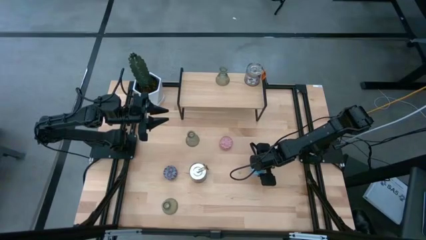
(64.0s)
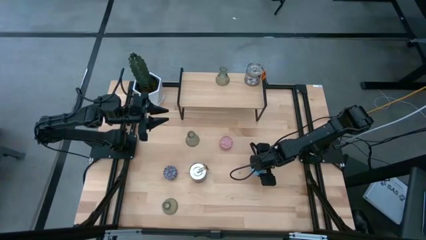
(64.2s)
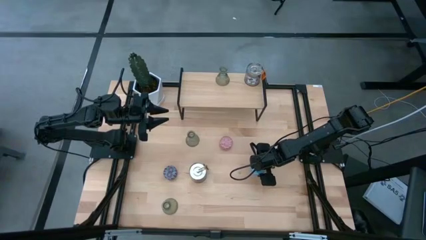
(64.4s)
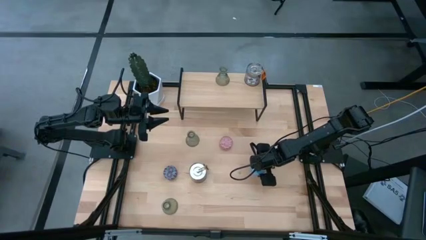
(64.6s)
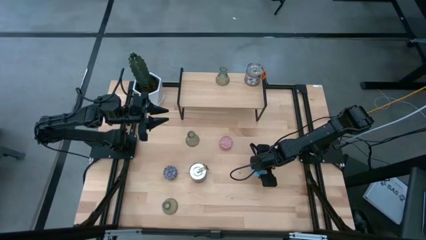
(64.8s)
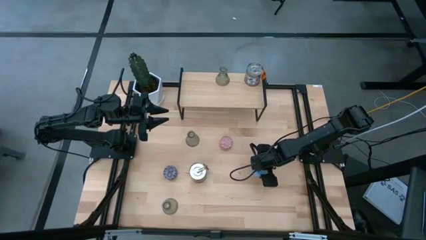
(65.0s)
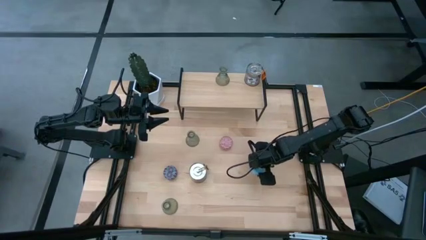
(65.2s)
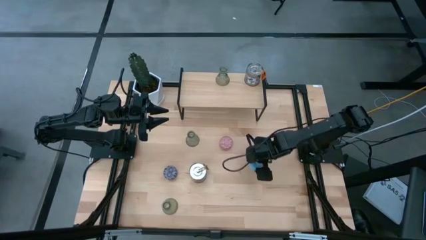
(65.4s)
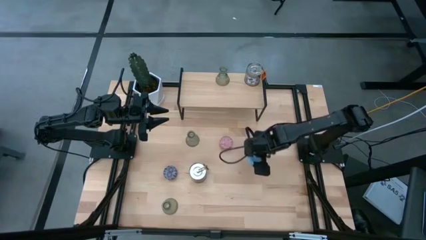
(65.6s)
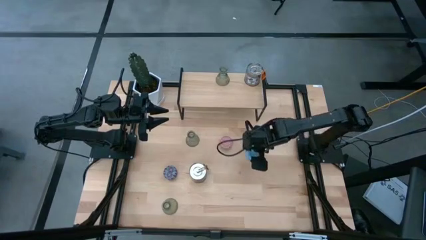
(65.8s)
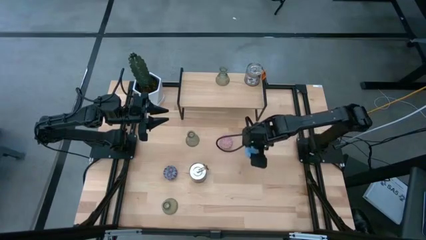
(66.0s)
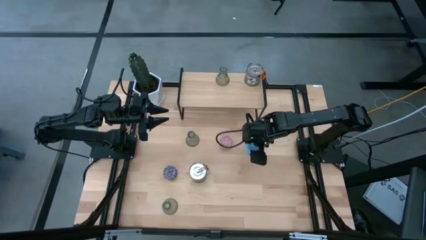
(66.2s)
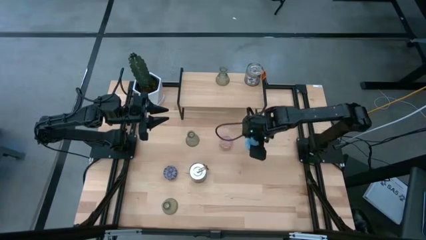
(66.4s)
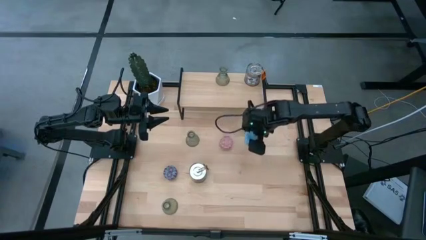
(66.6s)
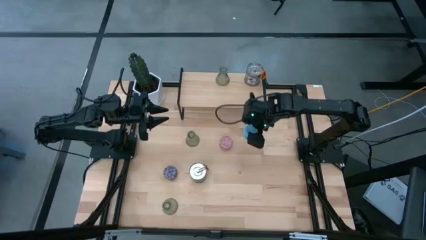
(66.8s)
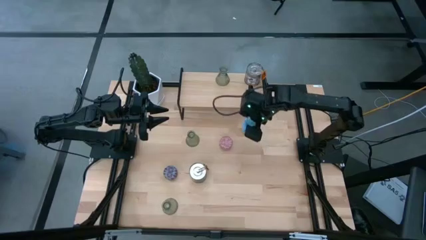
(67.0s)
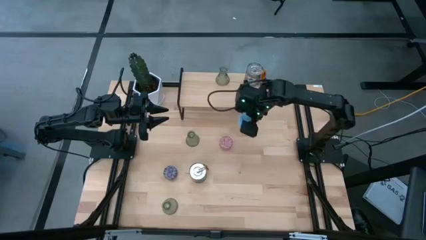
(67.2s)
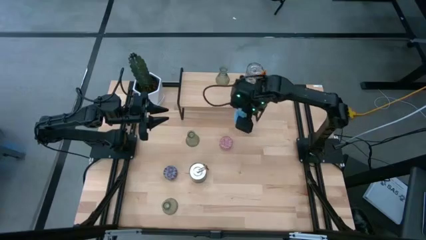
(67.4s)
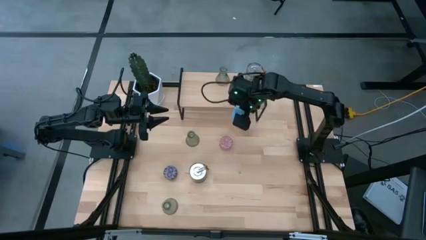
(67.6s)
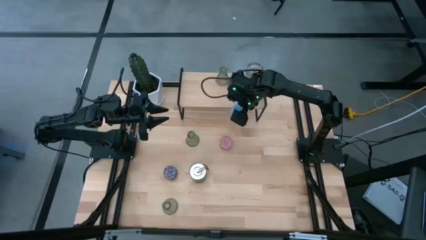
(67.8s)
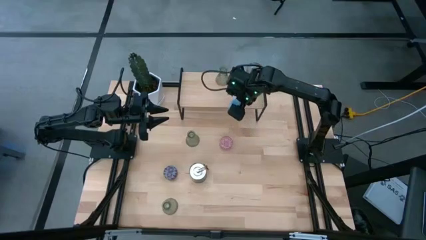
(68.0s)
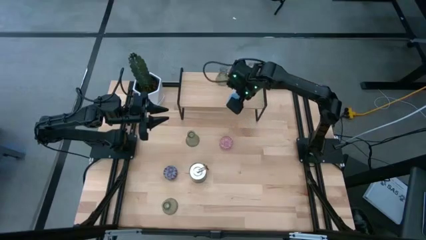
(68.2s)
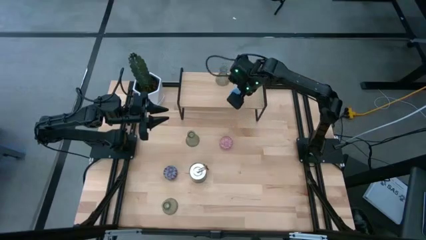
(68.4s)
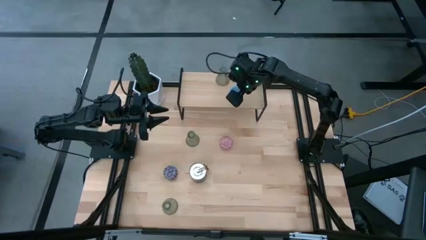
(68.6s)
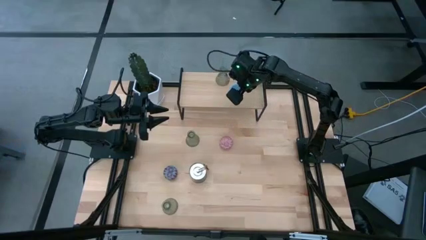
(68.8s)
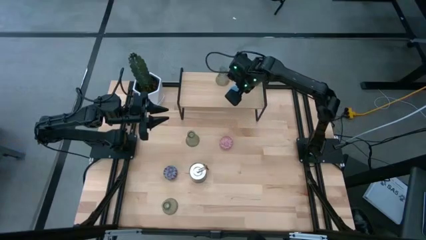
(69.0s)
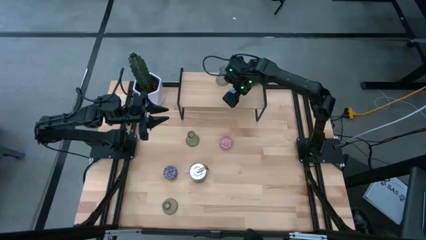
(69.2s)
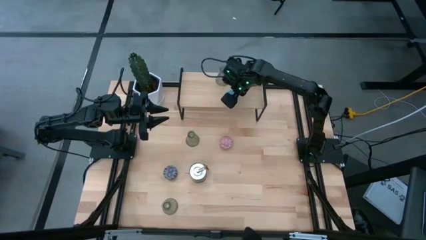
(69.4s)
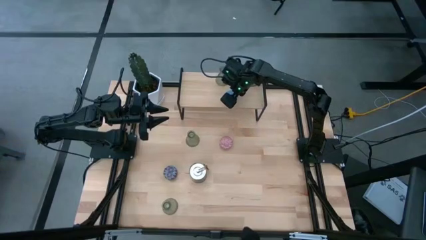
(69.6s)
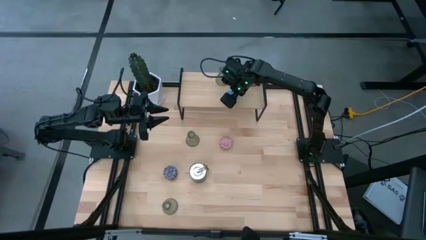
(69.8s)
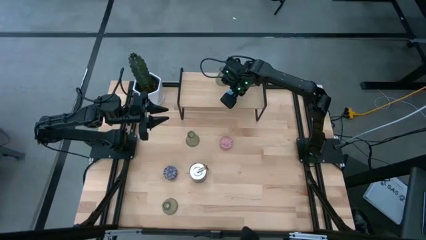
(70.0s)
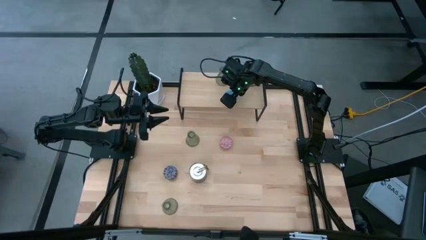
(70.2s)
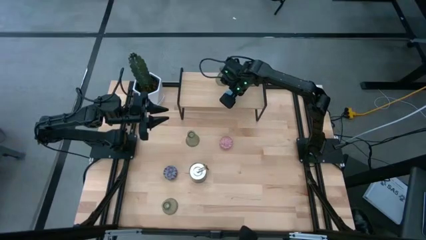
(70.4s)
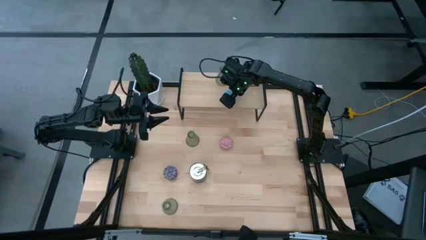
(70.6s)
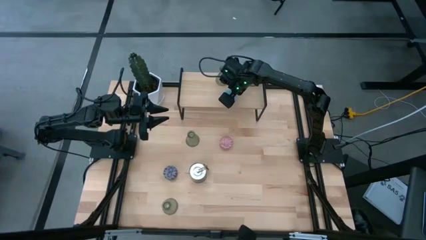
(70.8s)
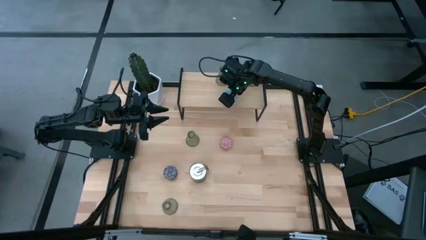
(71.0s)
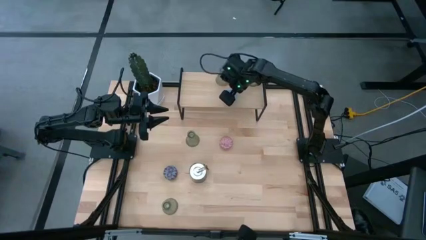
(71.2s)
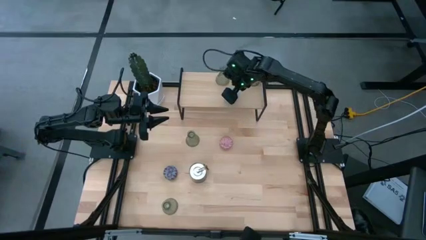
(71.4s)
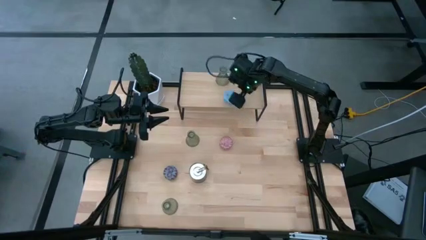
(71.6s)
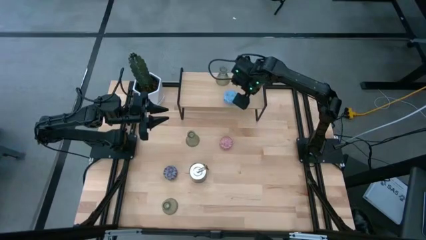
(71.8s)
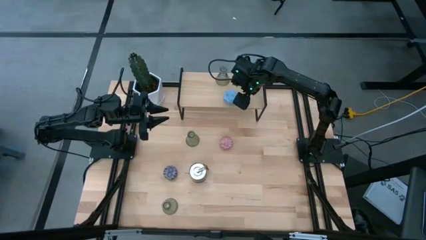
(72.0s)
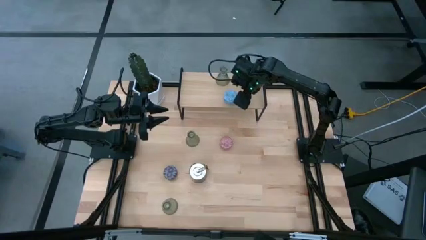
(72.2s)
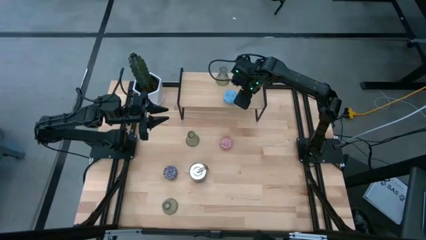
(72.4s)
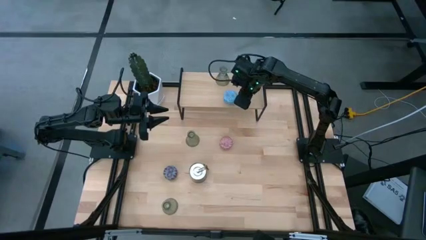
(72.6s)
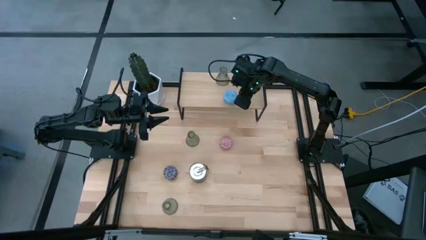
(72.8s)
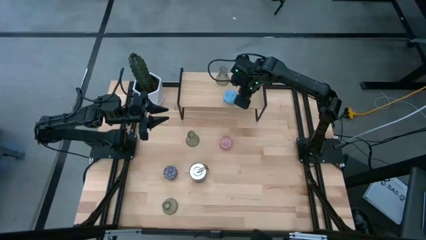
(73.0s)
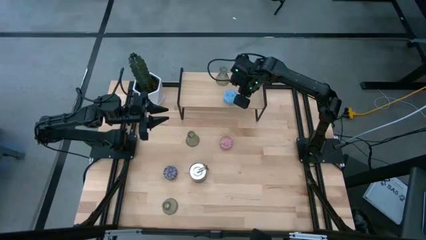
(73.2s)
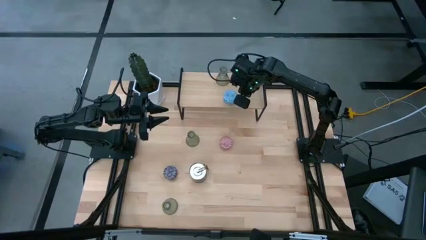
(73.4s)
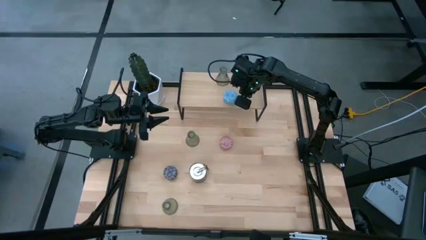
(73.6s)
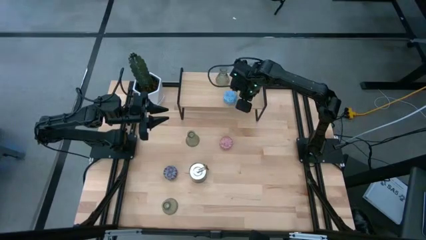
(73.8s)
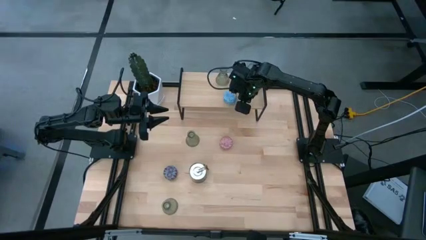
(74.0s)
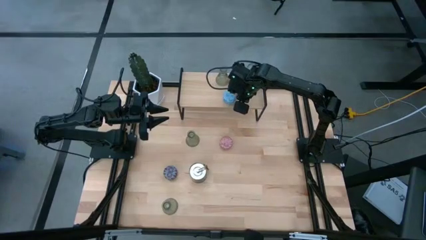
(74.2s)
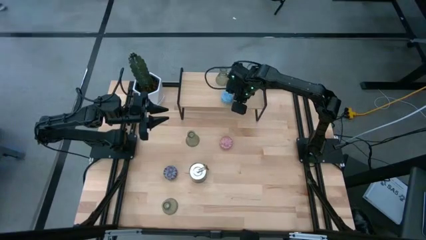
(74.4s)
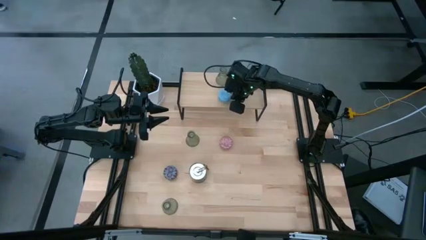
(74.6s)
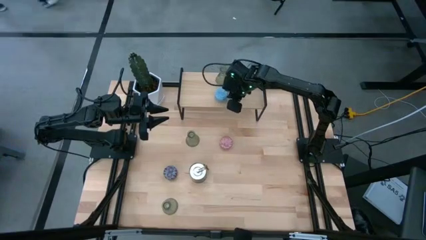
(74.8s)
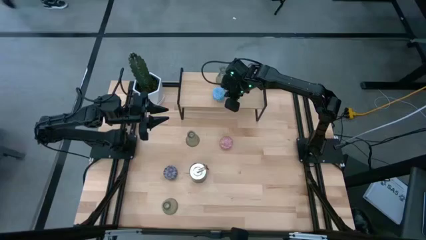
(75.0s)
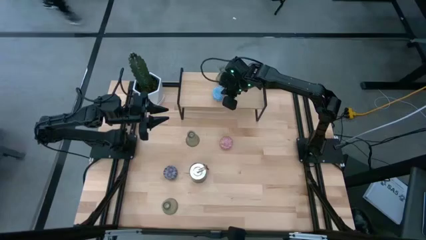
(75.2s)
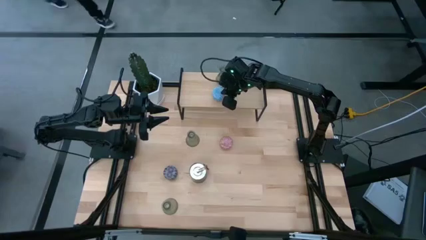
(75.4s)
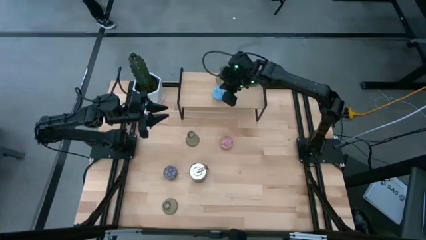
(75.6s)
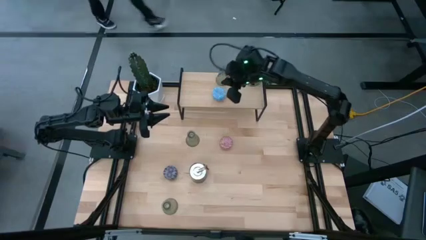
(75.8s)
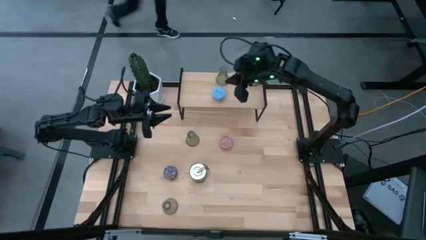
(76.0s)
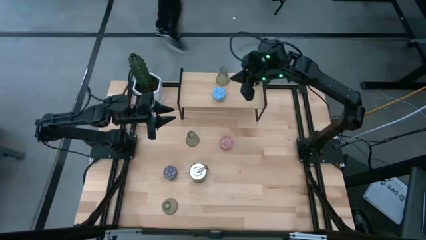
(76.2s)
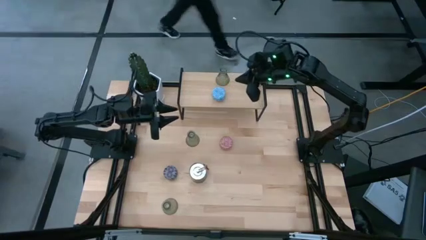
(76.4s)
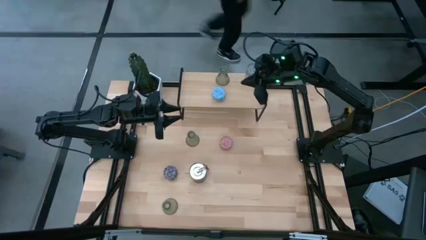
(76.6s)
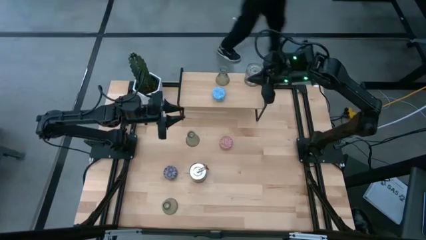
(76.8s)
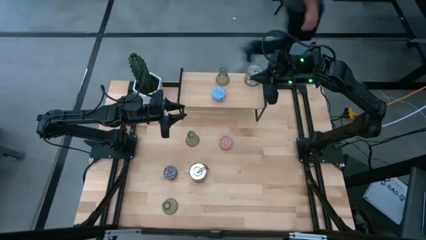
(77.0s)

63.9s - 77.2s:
Task: Pick & Place candle stick holders
Put the blue scented candle on the shelf
